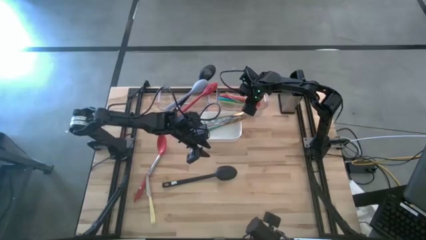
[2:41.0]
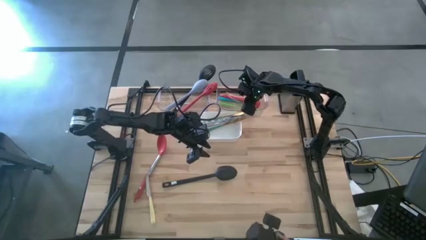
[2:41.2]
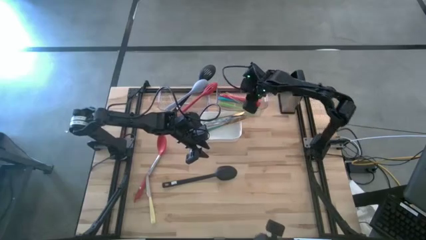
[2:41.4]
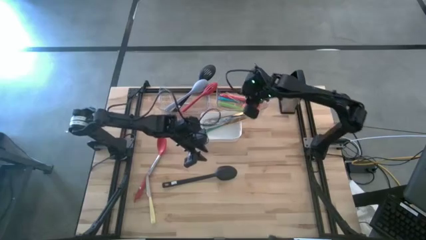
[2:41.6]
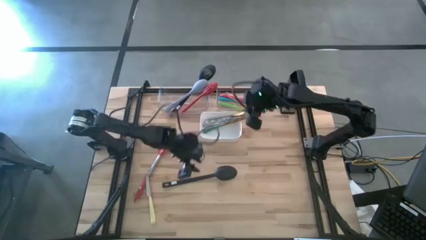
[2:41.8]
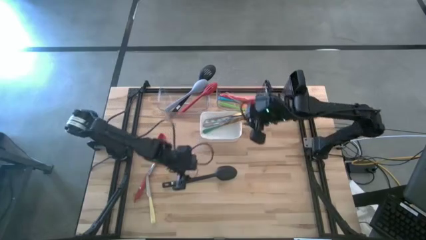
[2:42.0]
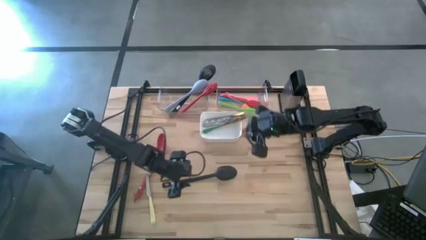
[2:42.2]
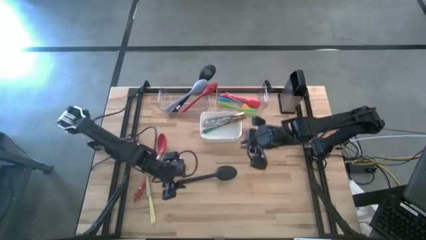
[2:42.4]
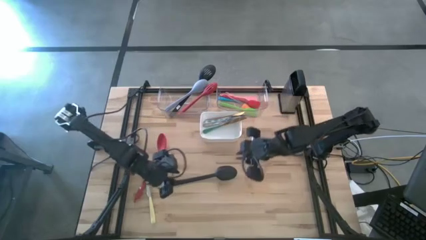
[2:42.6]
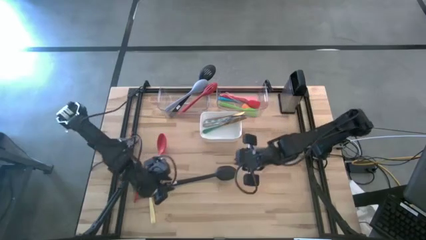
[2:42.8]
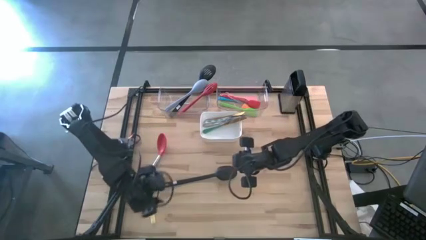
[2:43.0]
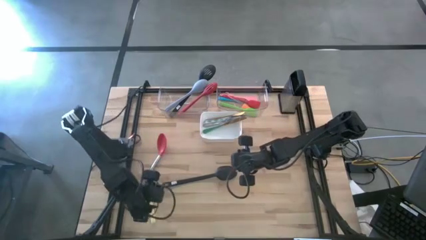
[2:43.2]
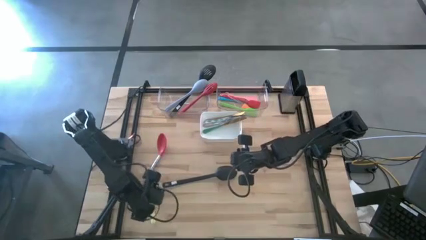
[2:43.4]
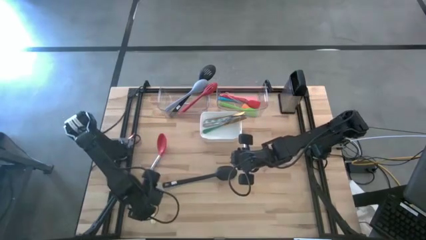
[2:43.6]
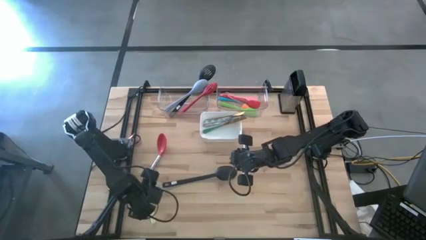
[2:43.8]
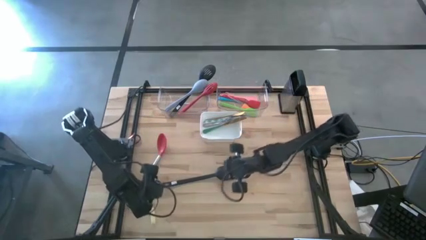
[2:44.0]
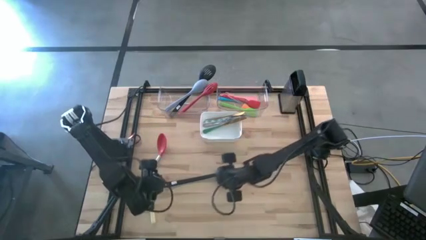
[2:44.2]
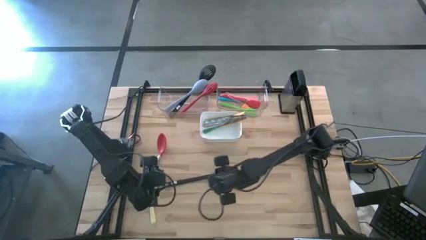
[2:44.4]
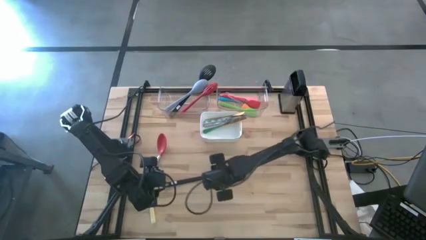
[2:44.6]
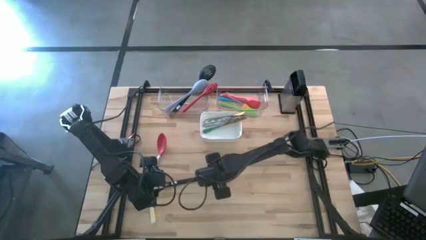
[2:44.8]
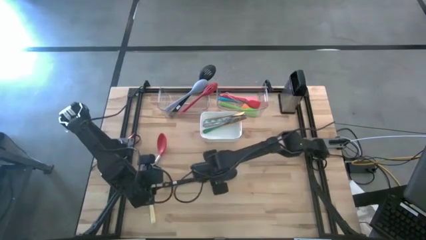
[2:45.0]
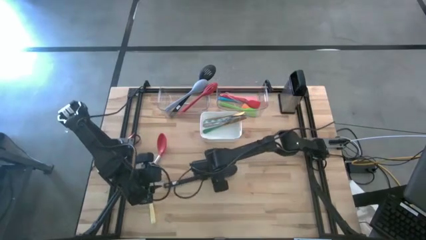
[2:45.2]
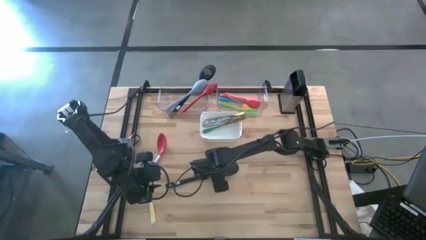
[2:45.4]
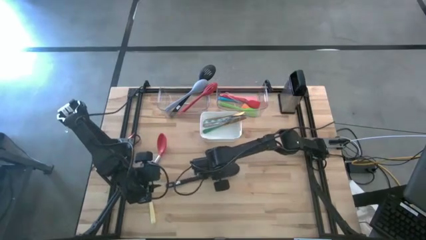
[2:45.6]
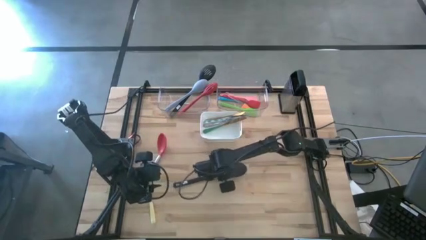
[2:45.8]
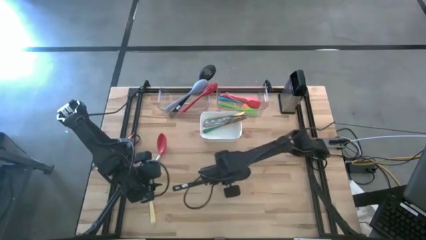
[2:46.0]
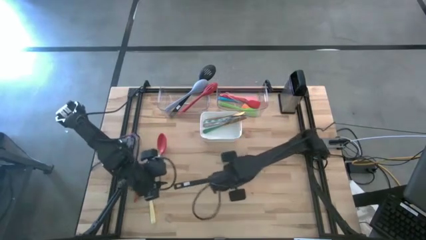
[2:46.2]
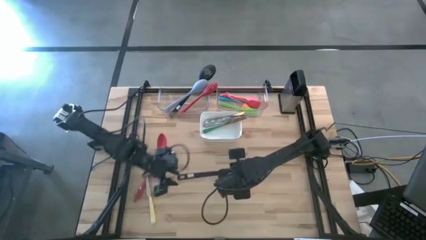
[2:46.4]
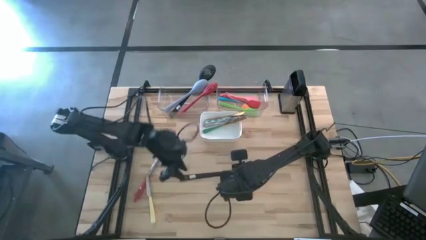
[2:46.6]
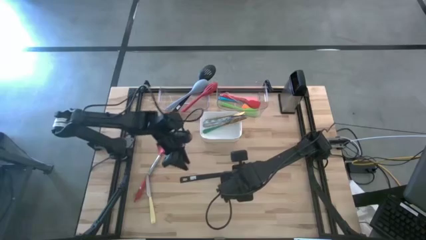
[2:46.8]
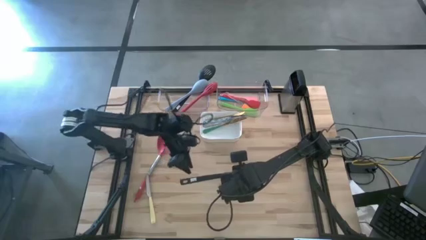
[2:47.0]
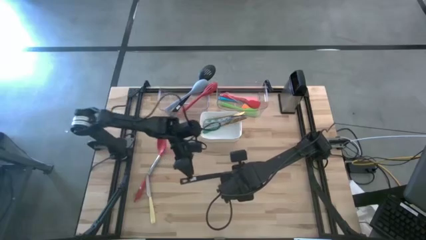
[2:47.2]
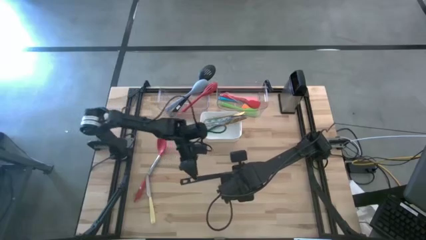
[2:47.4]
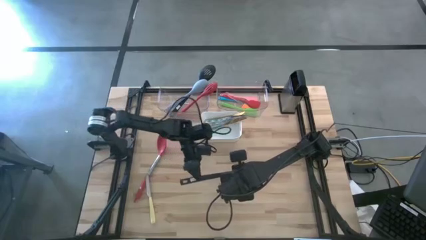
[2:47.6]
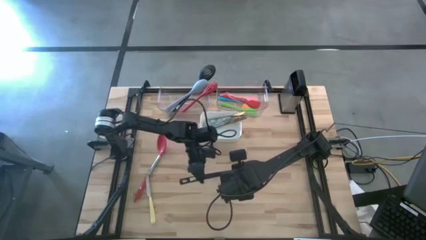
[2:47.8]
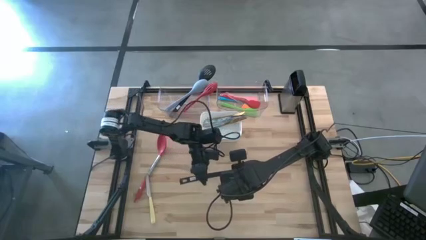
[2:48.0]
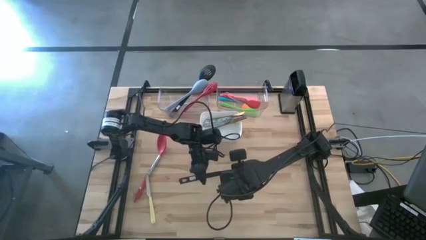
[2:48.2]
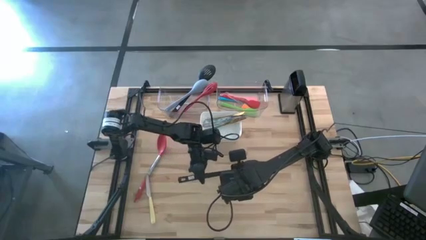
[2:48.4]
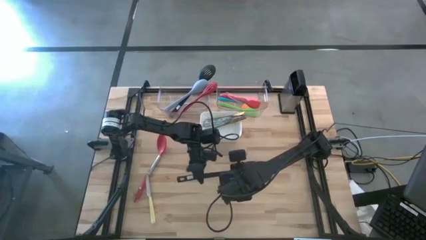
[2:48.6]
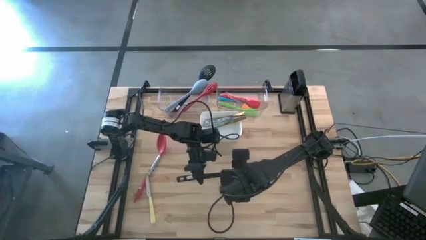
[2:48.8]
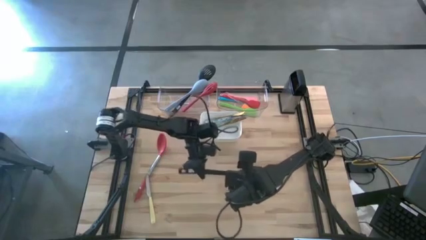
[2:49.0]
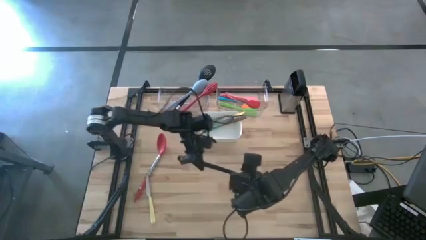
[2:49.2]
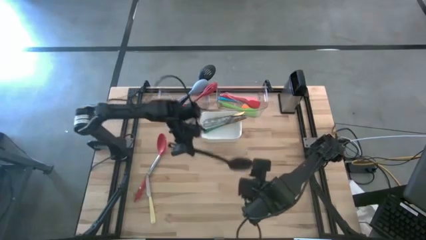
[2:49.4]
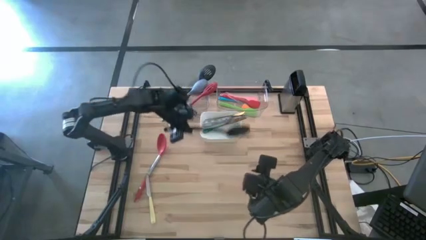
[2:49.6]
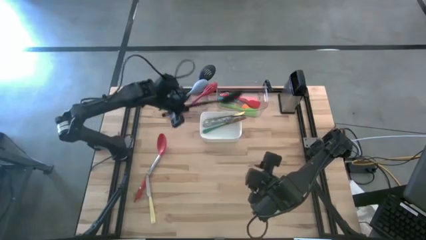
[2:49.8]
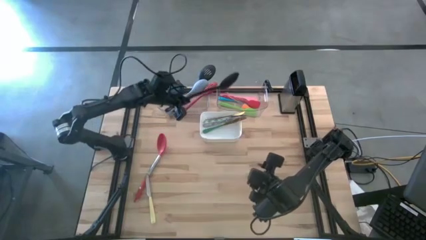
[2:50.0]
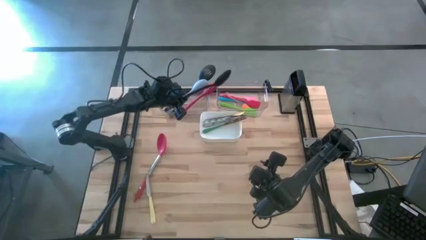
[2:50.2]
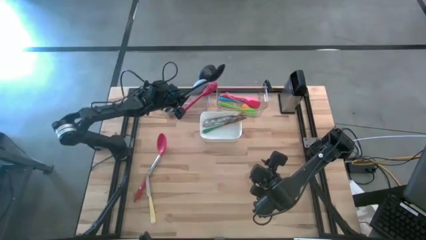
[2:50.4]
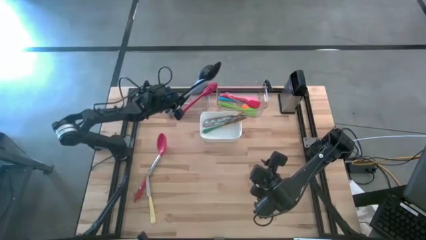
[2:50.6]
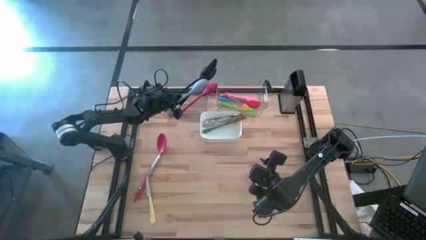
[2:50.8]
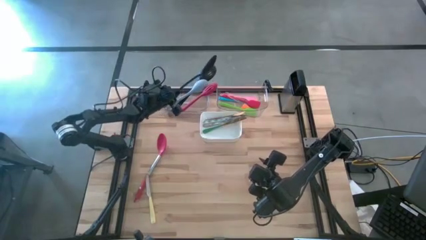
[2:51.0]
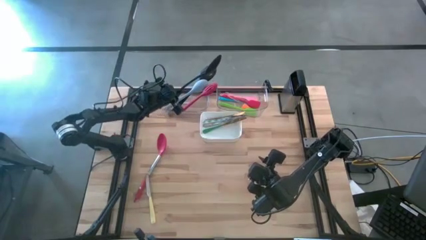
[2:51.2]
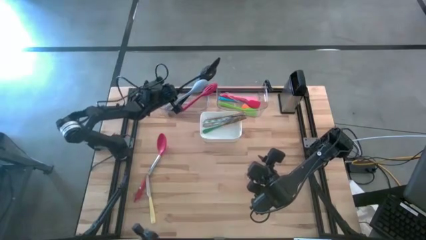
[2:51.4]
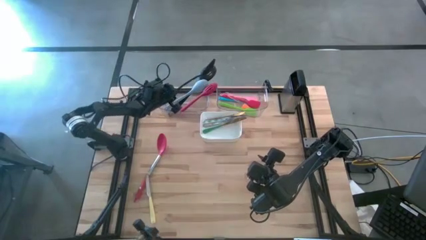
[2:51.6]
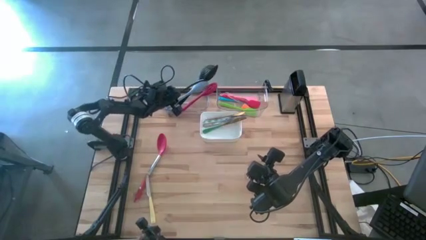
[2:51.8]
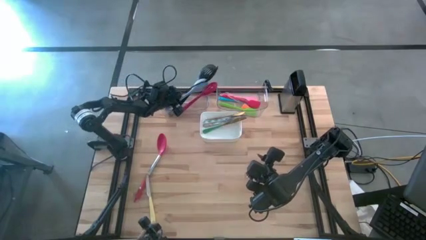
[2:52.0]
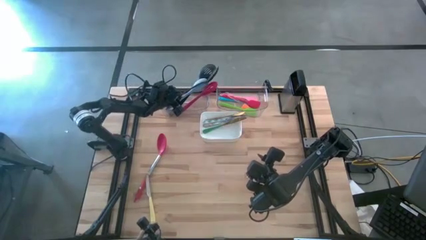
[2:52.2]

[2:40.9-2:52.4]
Task: Pick & Place Kitchen Items
Put the black serving spoon into the left transparent bin

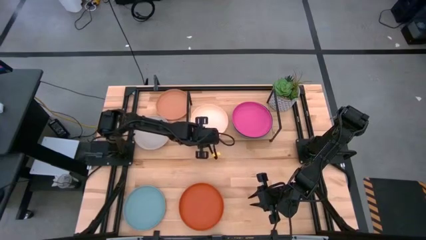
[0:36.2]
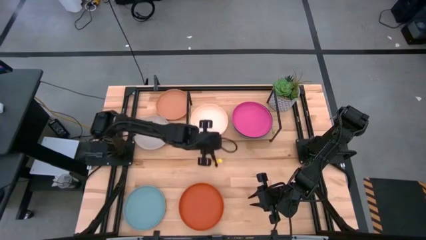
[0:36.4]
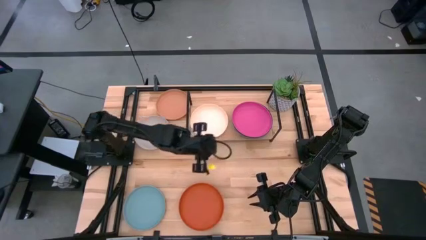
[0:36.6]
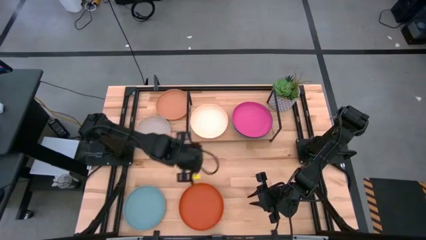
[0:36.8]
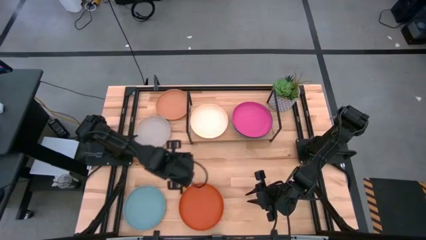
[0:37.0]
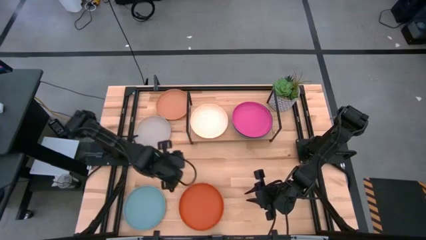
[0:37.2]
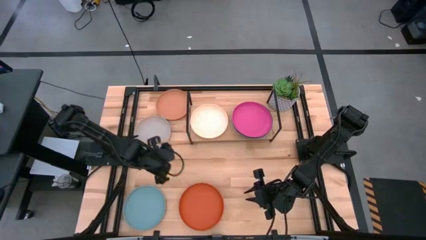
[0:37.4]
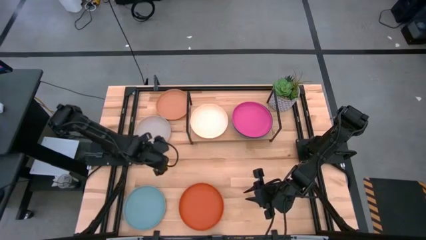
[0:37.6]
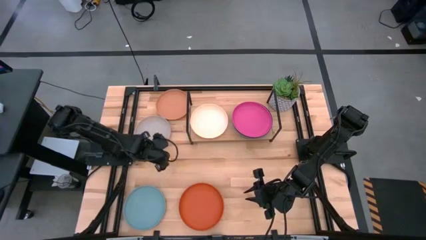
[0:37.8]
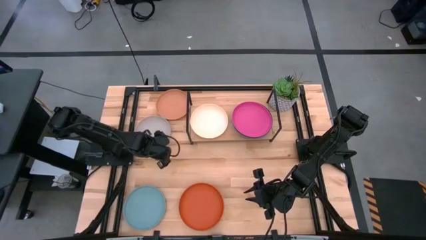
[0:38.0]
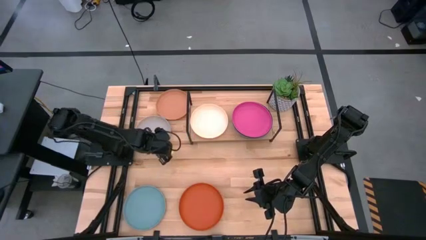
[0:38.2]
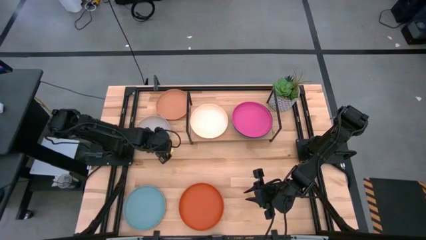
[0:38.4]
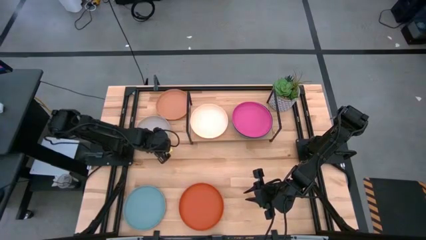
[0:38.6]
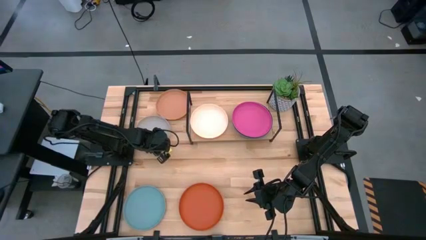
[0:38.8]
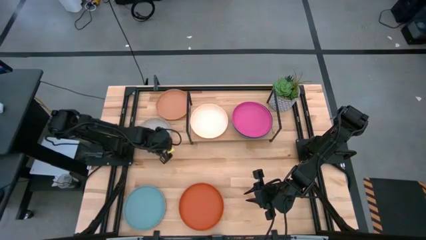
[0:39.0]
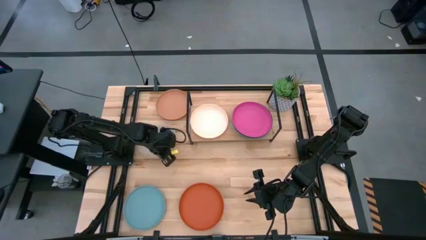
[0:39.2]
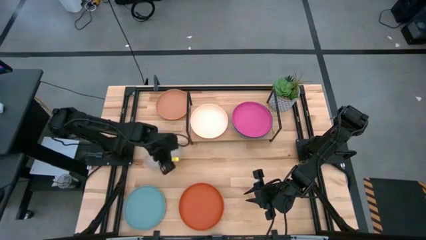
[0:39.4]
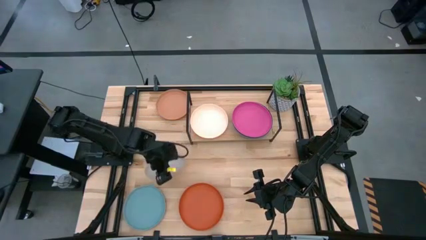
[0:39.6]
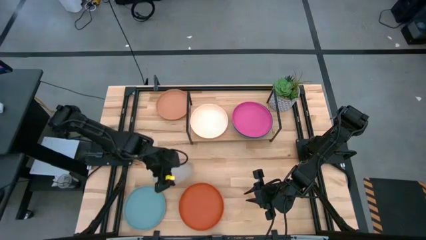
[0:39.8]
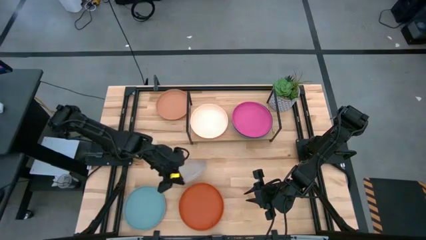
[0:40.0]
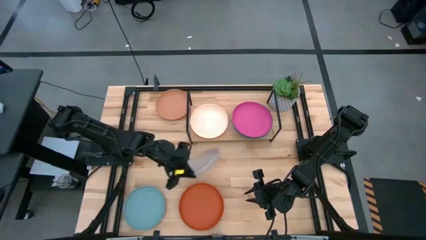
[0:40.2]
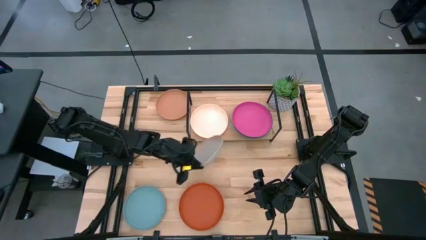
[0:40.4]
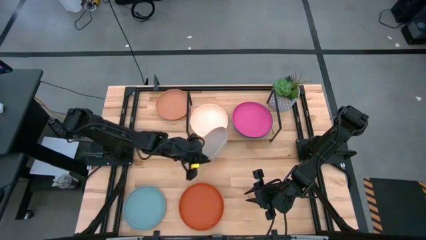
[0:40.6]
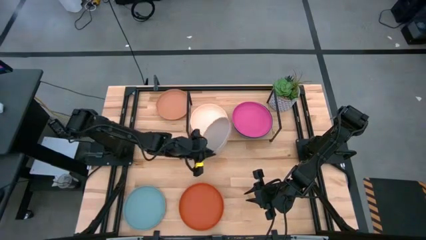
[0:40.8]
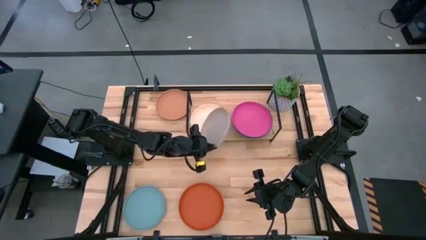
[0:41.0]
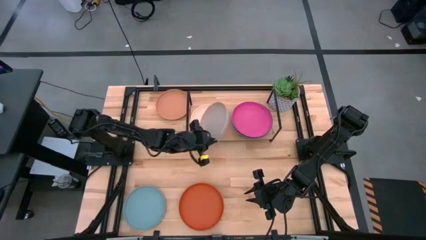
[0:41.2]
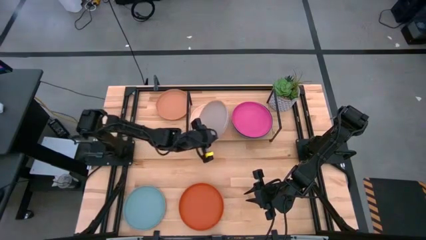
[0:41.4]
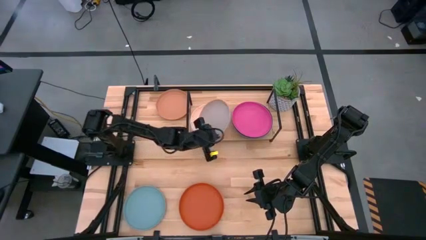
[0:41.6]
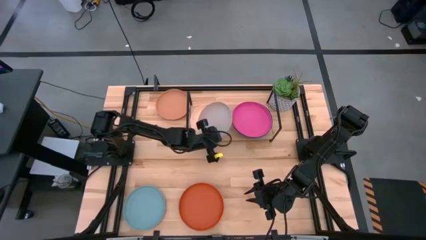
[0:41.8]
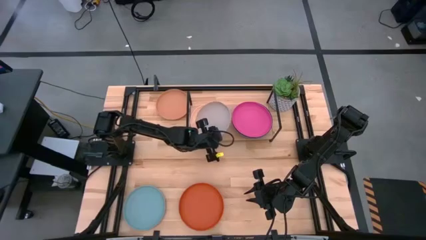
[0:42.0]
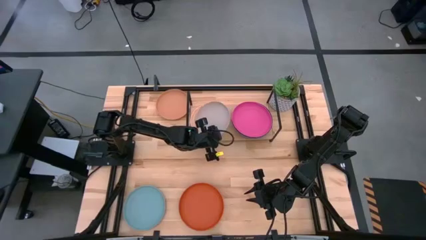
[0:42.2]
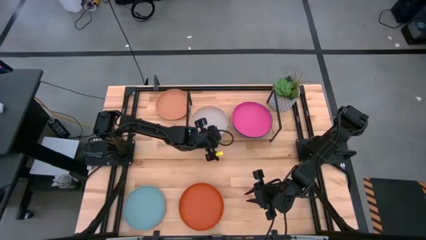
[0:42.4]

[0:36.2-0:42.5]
Task: Place and stack plates onto a shelf
Stack the gray plate on top of the light orange plate on the shelf
